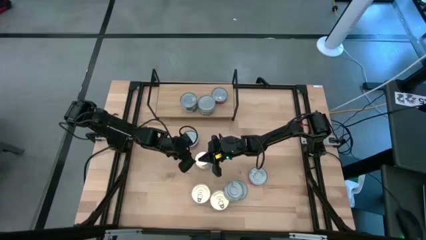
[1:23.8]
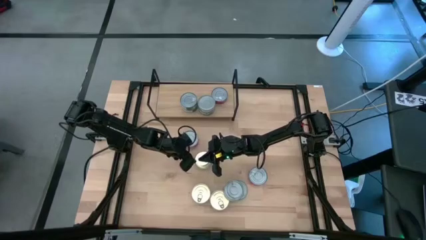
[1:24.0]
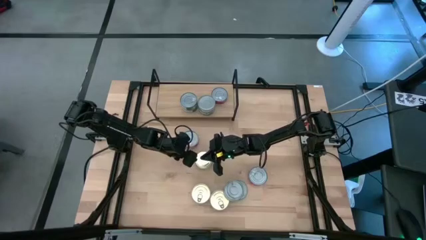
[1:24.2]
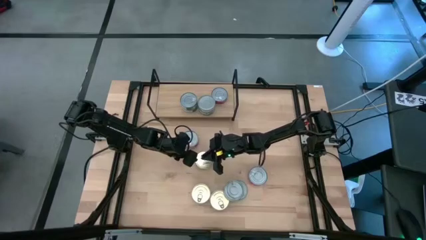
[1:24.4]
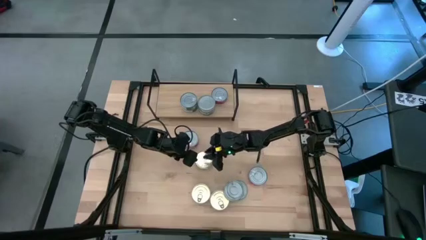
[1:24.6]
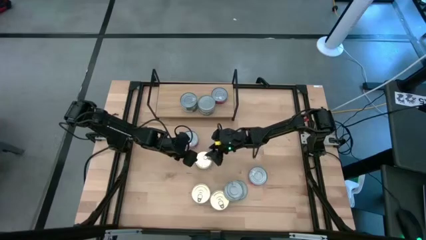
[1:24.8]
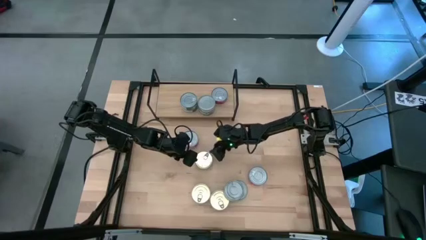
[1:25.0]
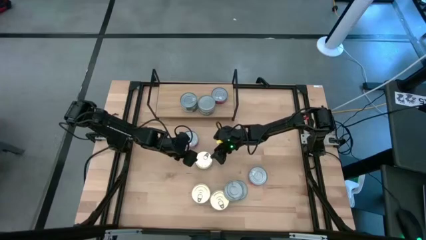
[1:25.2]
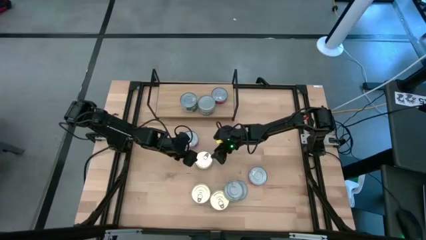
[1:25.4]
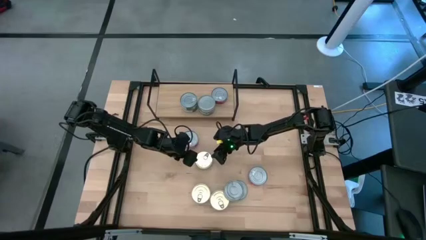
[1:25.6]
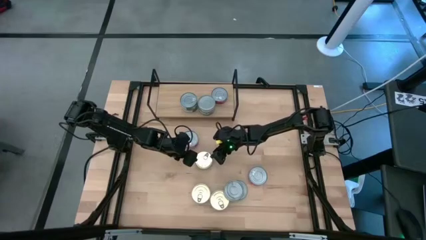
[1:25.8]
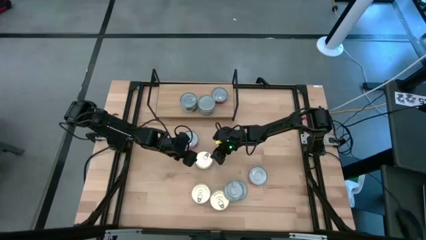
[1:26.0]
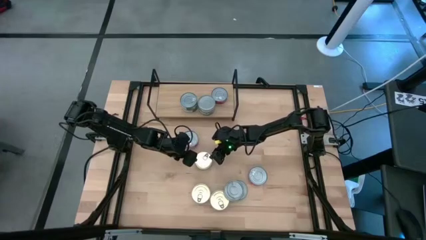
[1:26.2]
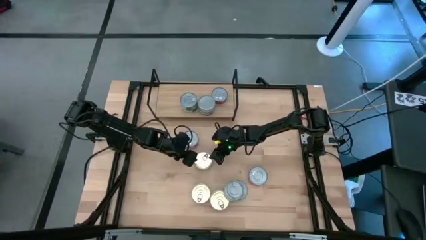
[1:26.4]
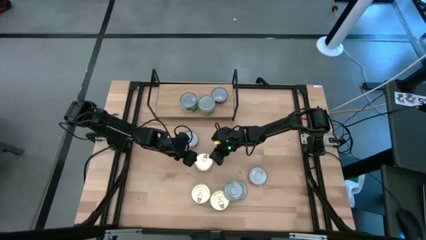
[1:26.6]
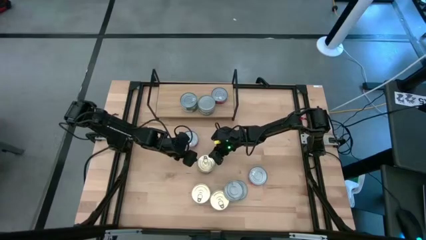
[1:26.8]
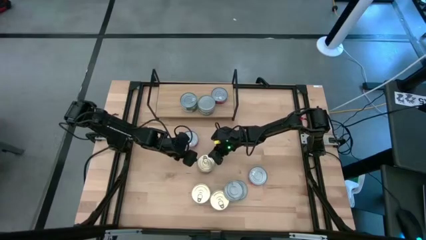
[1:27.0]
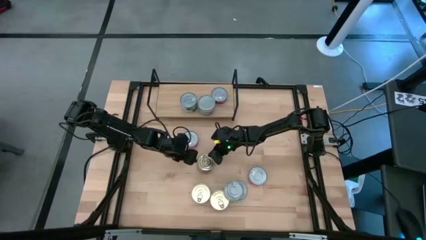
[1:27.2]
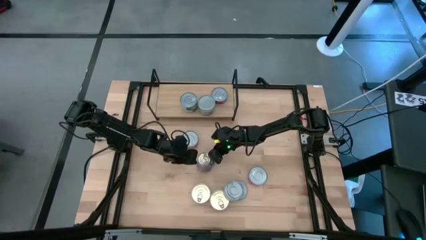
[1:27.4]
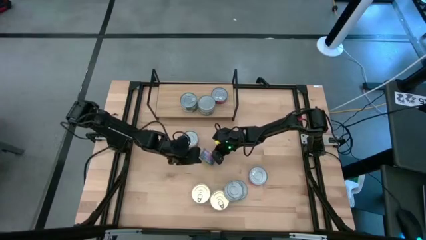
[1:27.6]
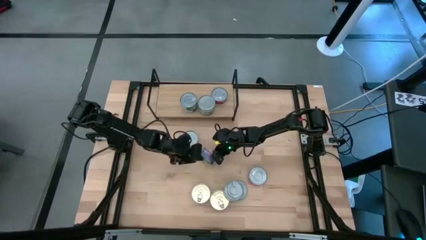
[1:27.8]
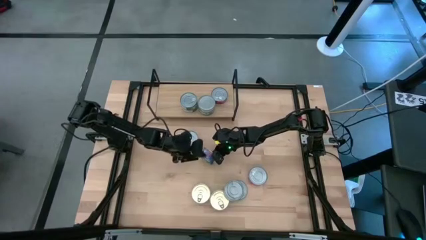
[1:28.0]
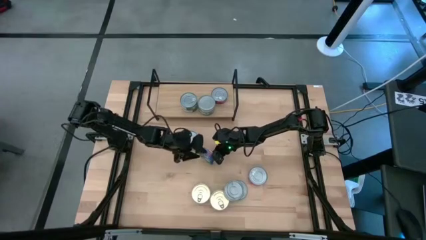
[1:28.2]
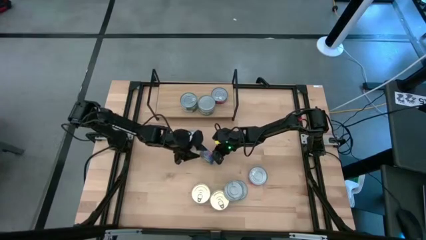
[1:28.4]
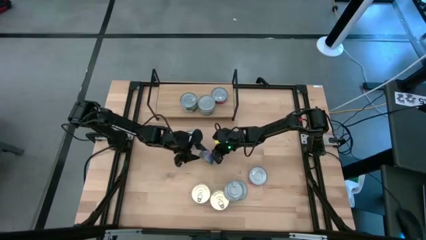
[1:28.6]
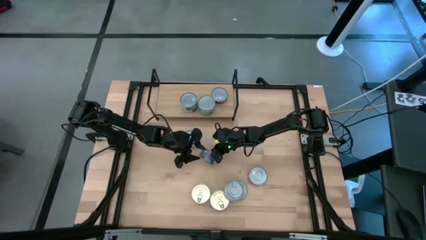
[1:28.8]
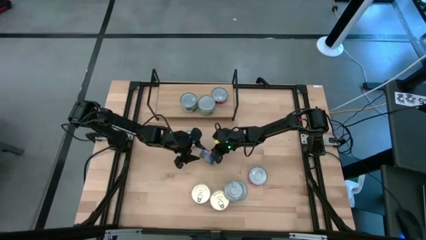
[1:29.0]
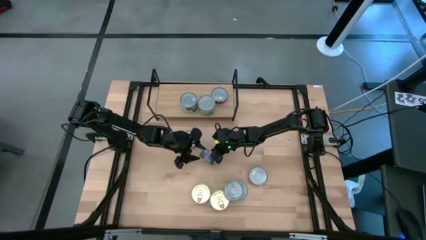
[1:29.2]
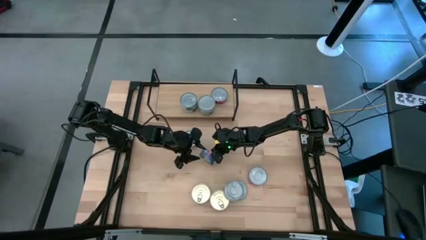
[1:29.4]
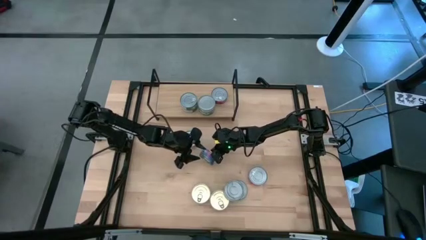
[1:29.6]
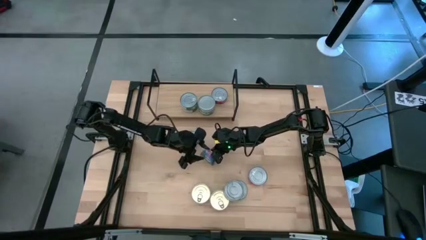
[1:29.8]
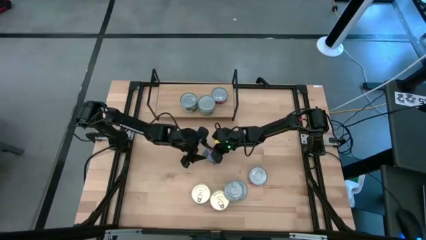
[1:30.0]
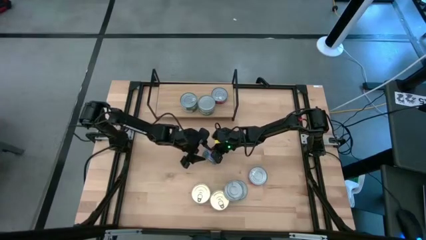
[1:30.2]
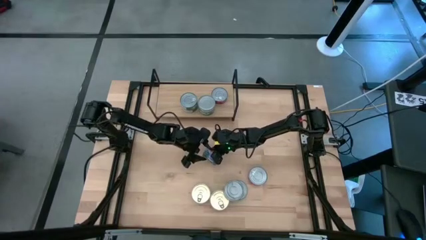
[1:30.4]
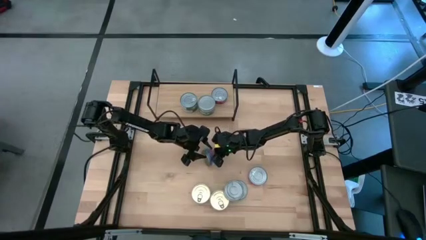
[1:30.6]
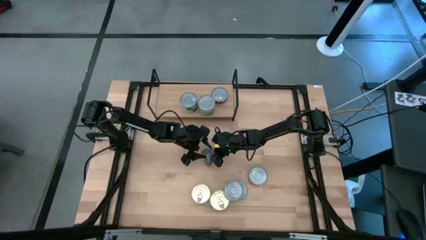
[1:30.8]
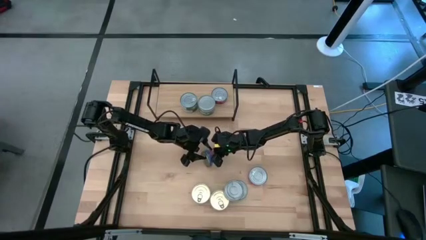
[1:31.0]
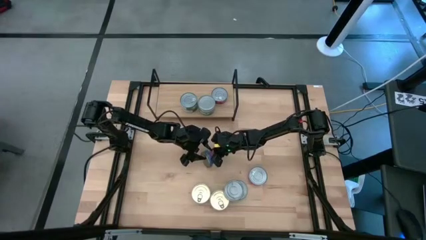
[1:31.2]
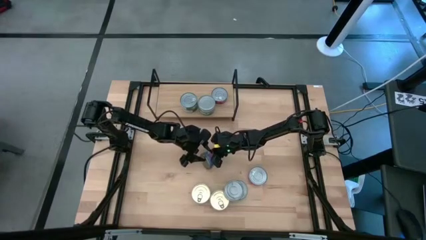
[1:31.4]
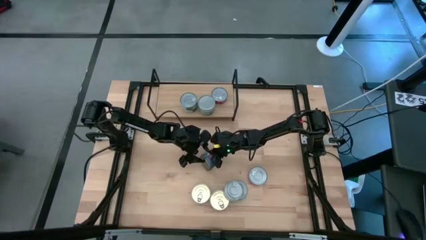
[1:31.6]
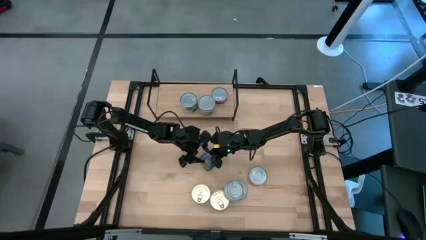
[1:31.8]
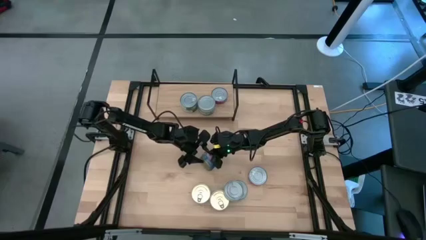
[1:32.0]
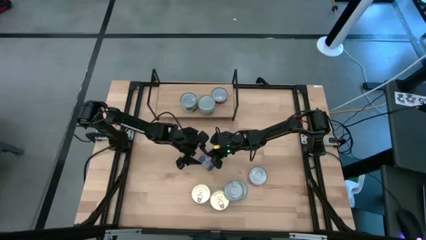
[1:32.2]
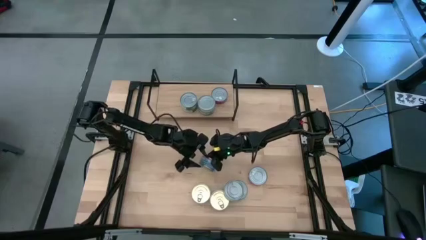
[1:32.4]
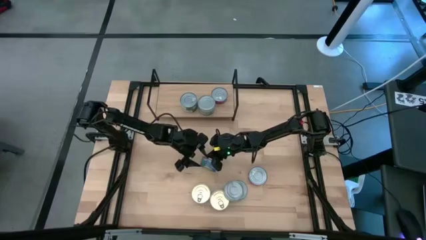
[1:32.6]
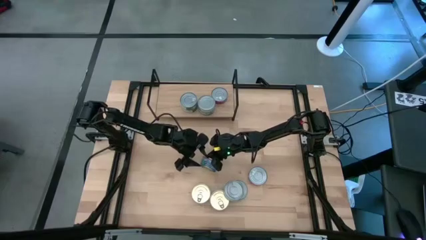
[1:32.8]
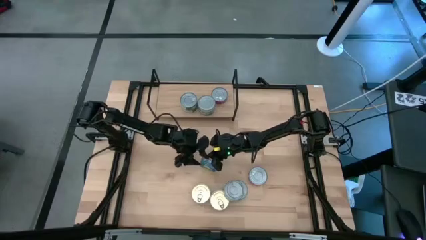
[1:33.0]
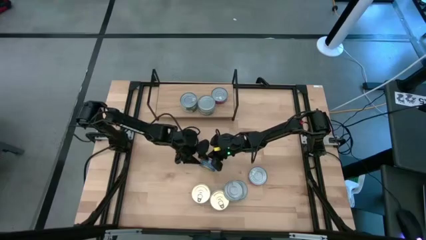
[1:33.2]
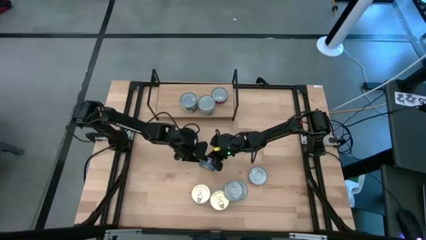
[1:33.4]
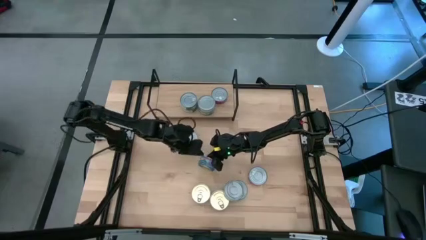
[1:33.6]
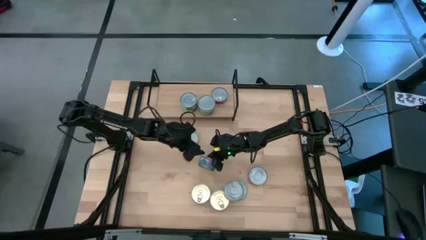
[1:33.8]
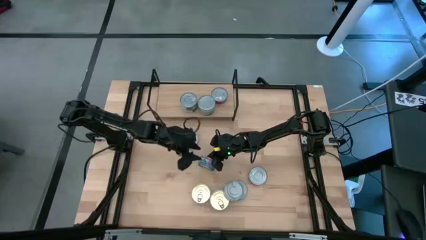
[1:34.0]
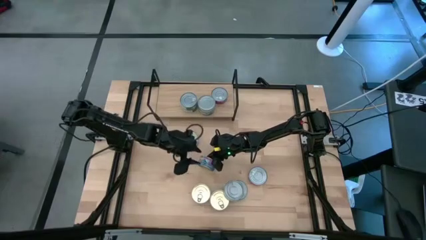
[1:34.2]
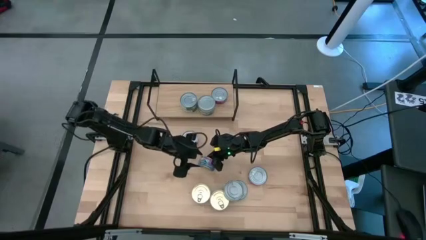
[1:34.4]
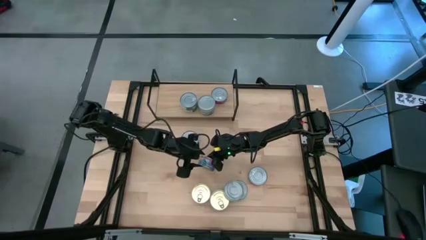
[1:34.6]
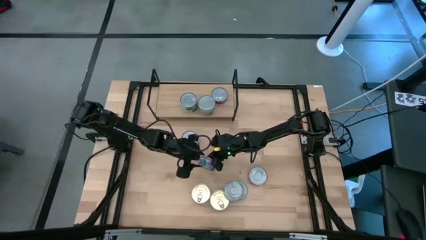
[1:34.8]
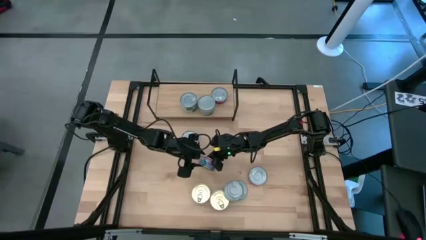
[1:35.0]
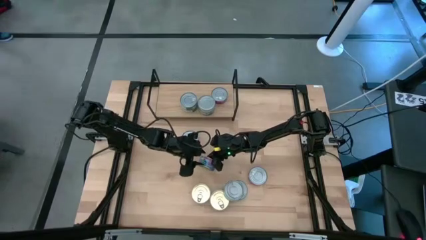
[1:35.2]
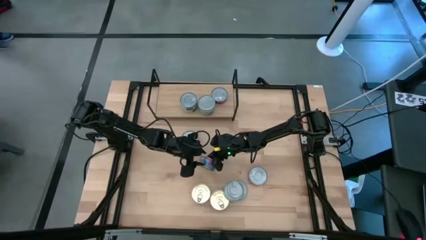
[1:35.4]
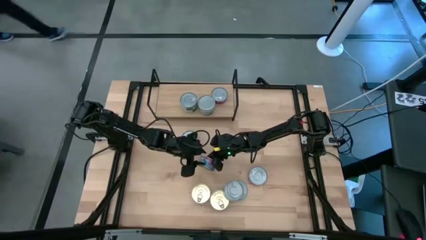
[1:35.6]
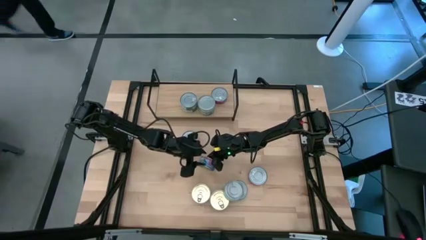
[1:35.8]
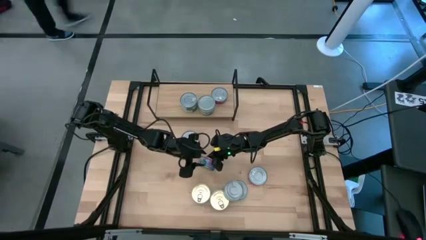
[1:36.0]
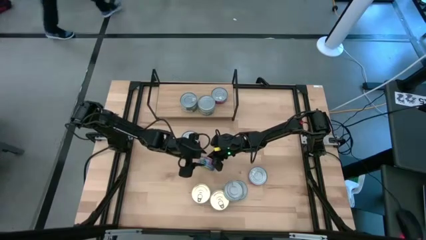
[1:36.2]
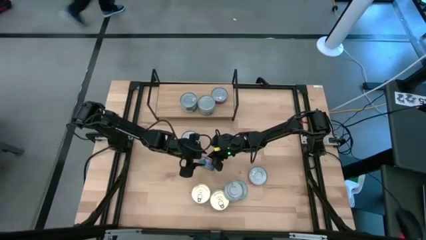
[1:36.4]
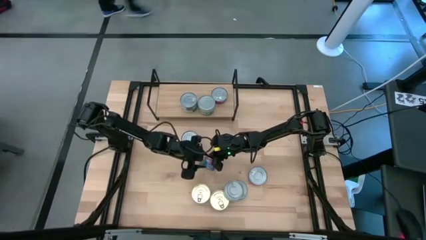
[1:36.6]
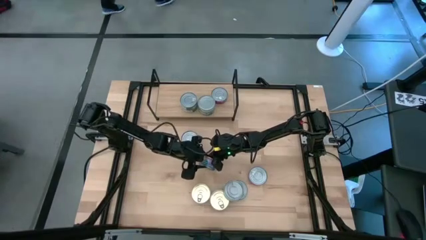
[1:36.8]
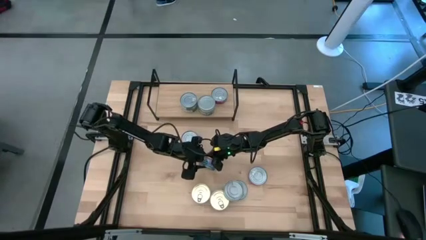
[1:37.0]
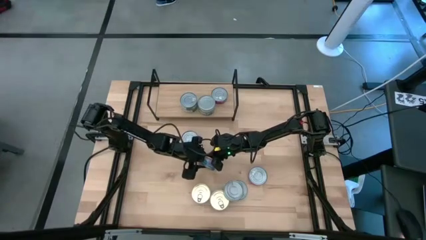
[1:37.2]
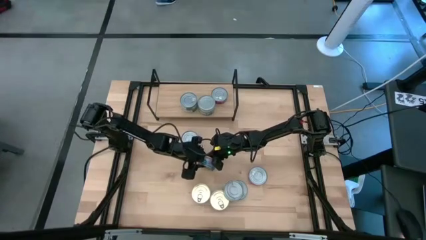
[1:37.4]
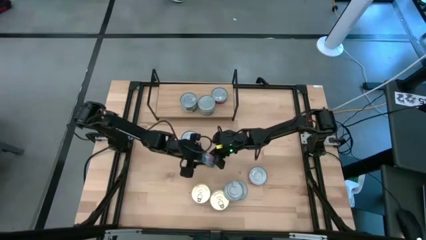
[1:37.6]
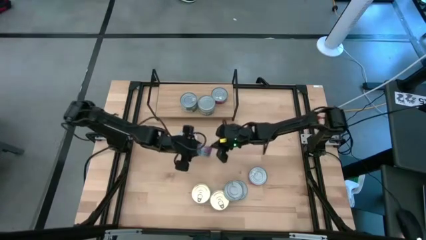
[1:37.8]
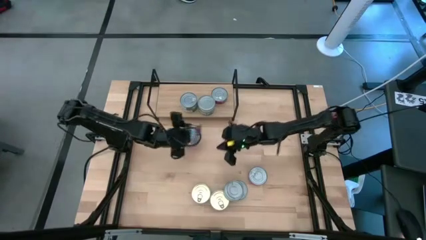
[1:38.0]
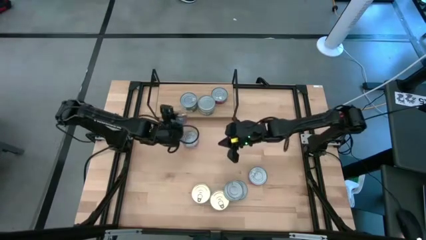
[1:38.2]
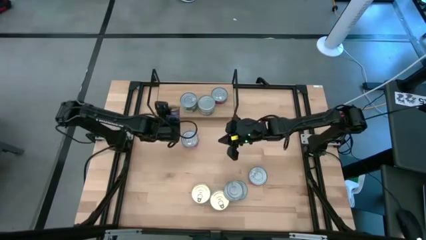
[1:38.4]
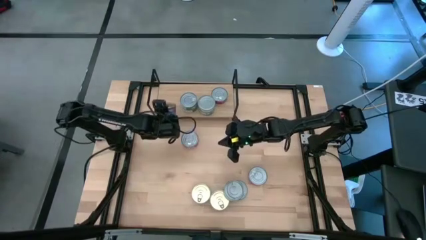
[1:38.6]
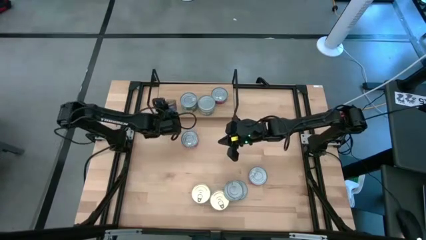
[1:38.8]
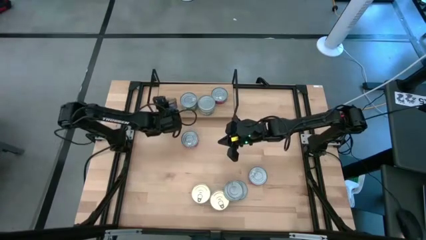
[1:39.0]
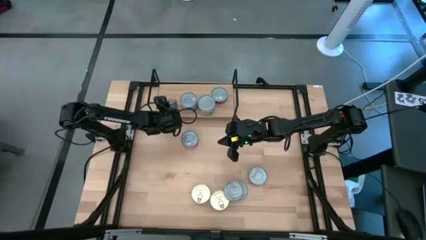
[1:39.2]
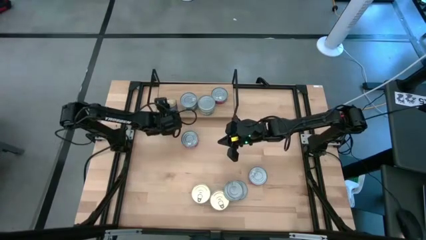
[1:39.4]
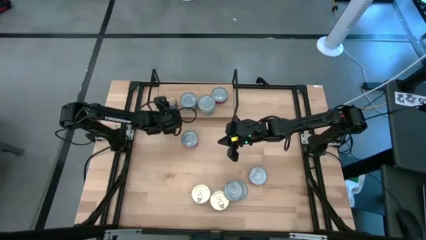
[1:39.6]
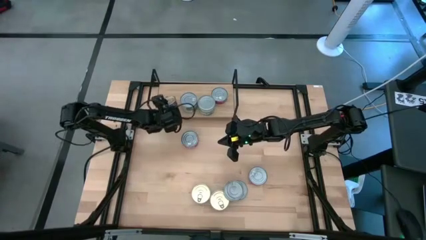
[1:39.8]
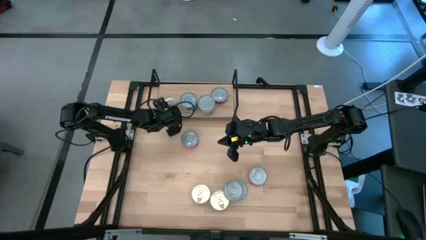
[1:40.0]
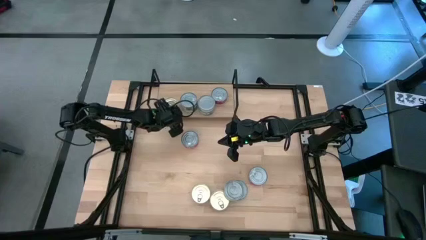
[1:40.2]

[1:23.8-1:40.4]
Task: Stack canned seafood by type on shelf
Put the blue tuna can on the shelf
